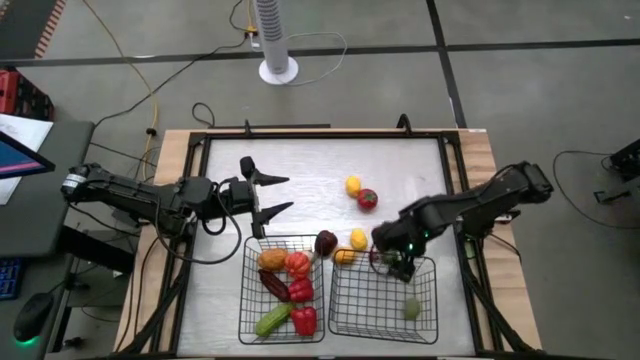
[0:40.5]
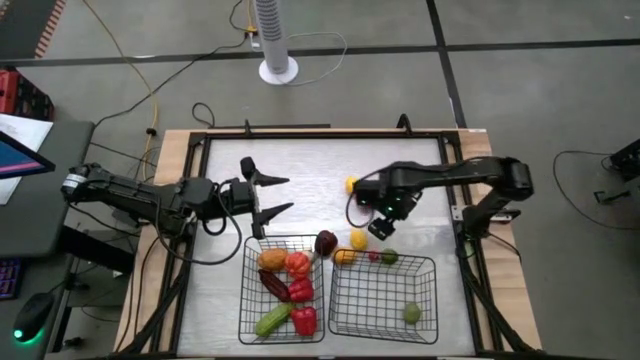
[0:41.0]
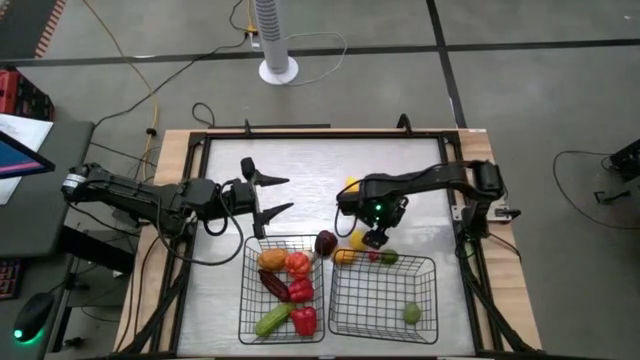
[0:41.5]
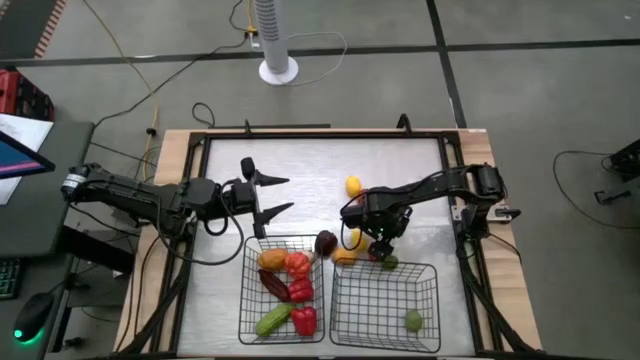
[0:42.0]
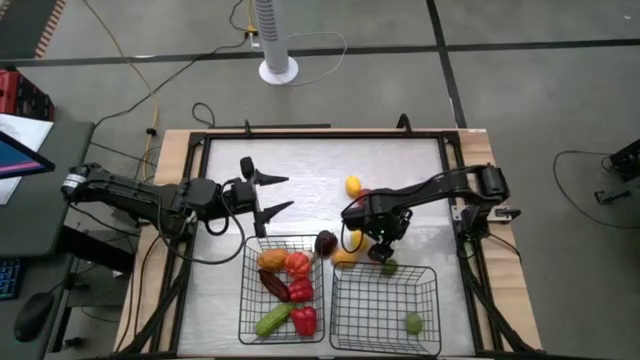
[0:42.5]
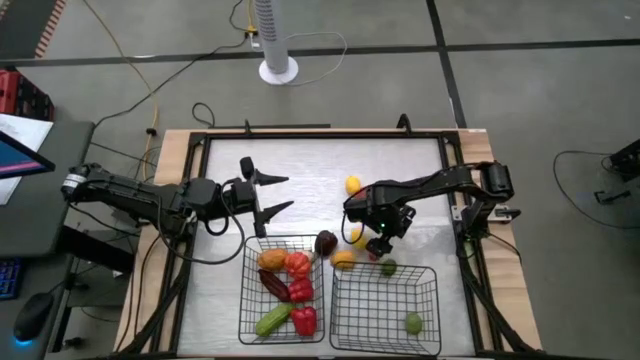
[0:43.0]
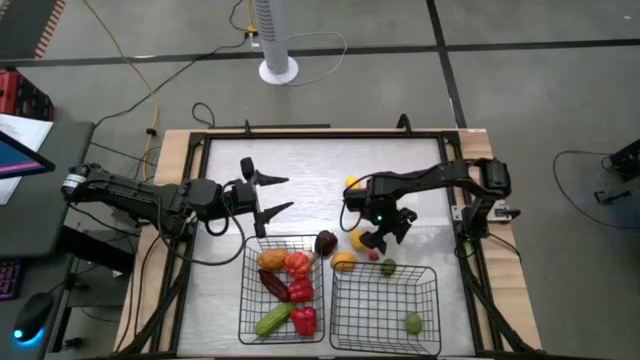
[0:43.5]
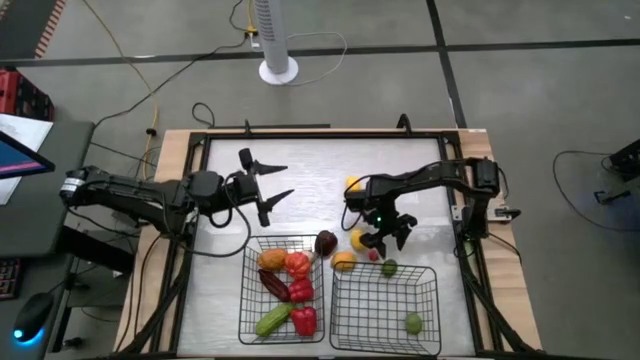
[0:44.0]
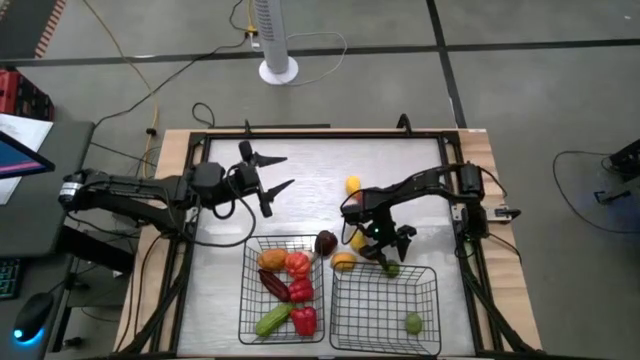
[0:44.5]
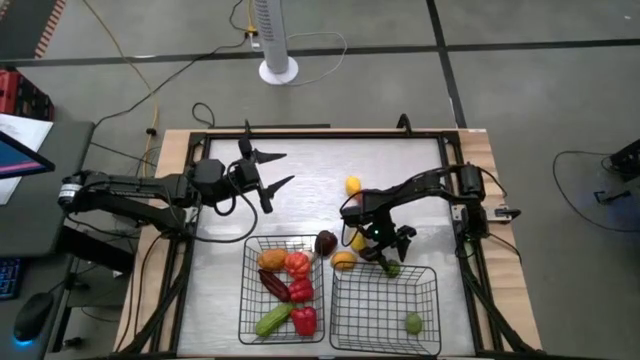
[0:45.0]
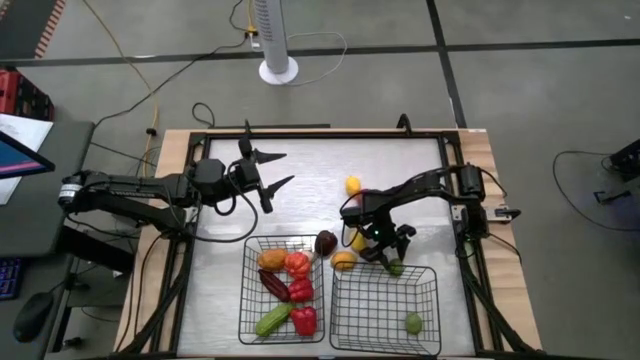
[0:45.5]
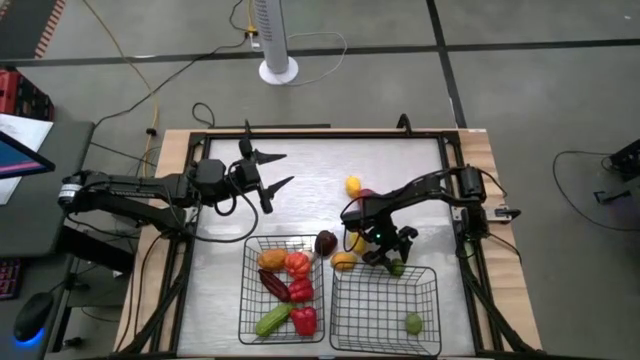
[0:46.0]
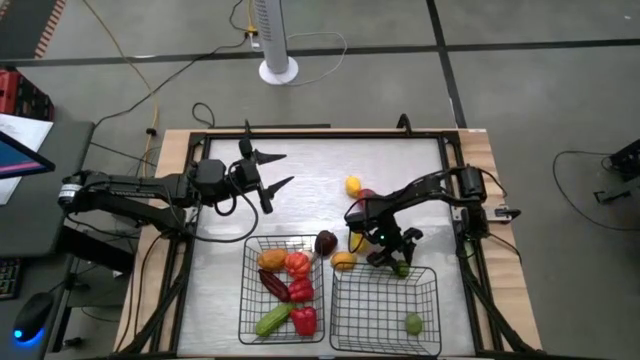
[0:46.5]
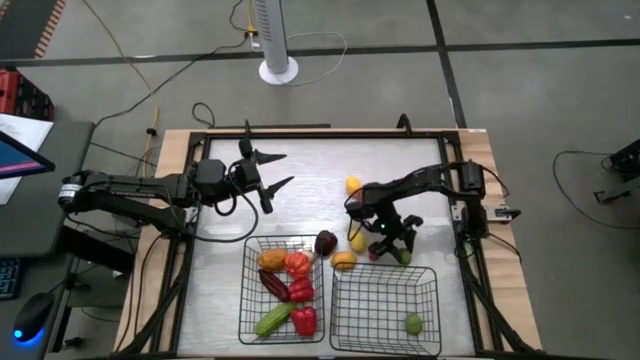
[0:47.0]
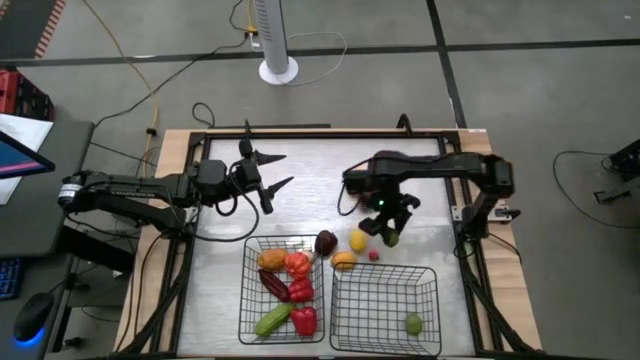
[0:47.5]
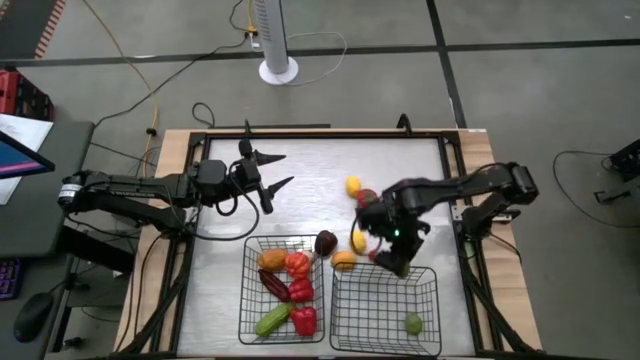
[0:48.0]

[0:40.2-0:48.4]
Task: Sort produce into baskets
Put the green lime into the right black wire basket

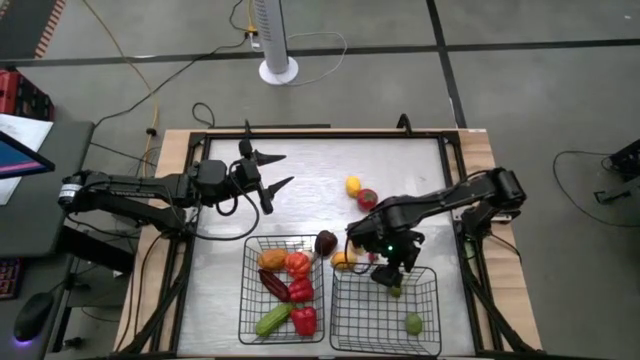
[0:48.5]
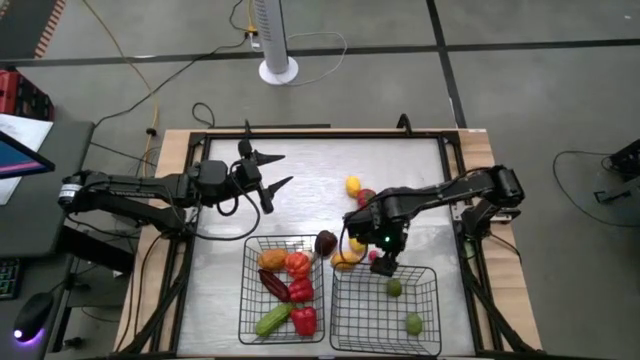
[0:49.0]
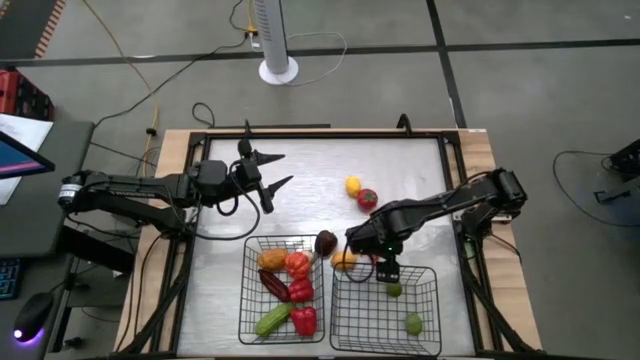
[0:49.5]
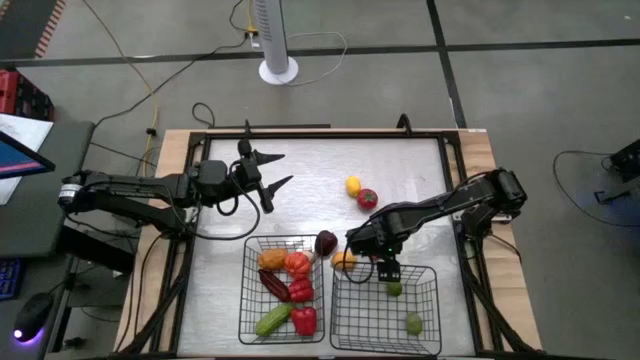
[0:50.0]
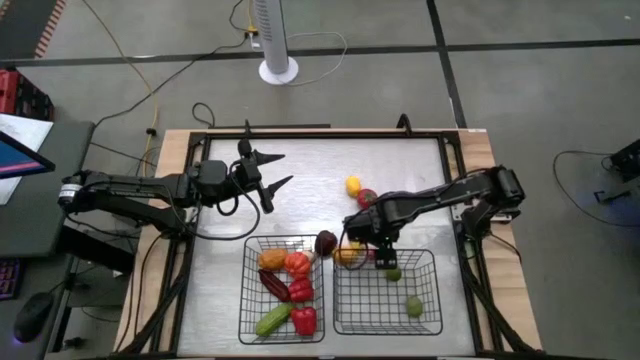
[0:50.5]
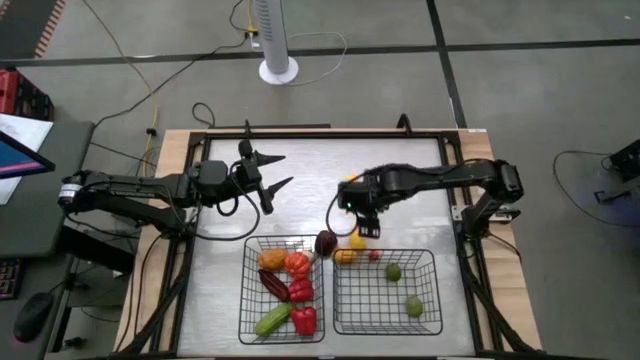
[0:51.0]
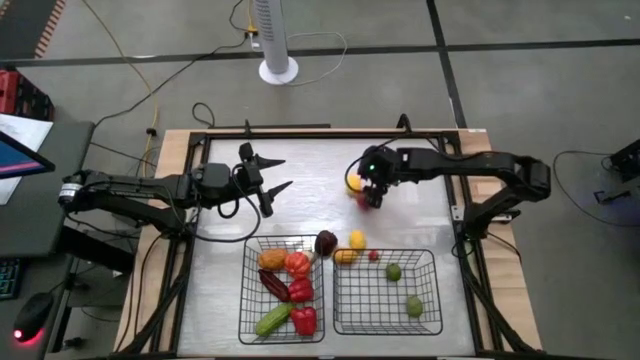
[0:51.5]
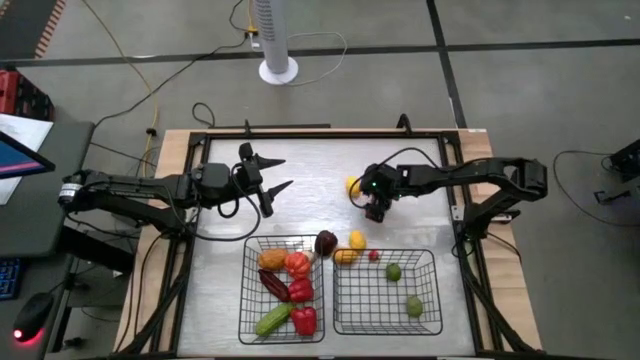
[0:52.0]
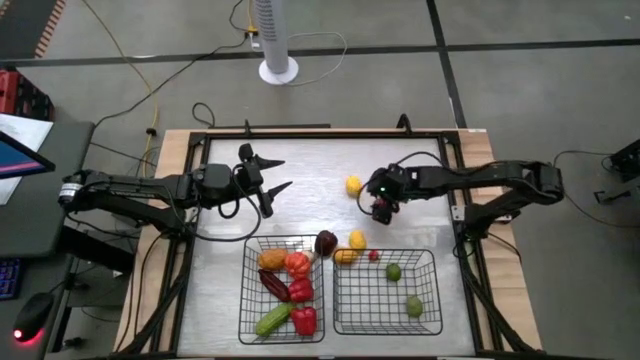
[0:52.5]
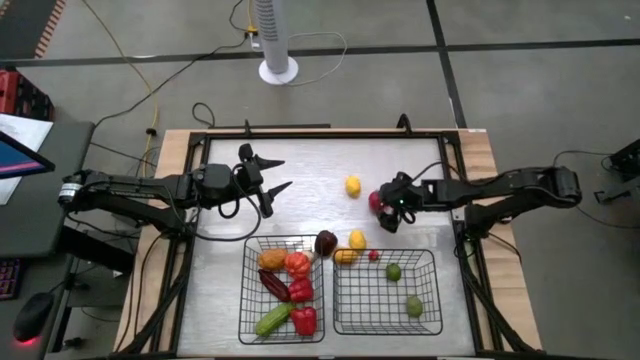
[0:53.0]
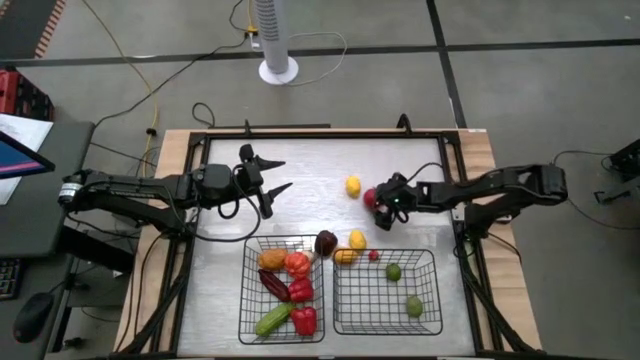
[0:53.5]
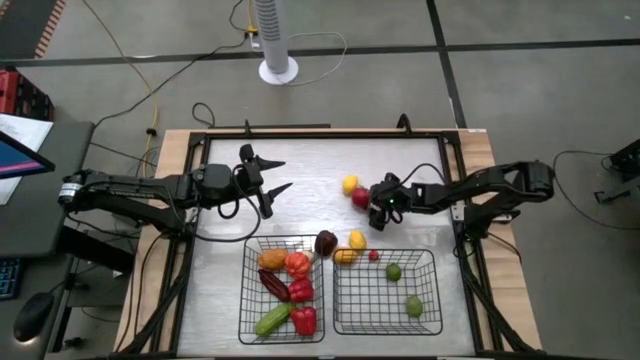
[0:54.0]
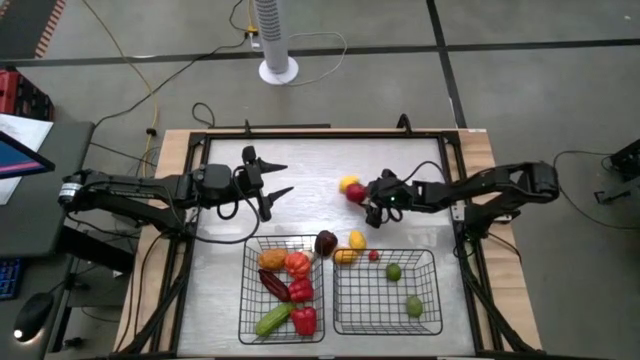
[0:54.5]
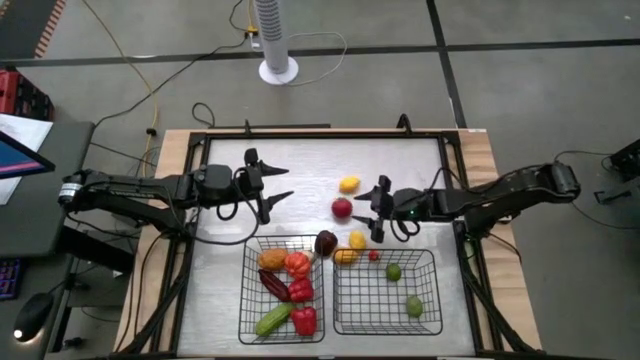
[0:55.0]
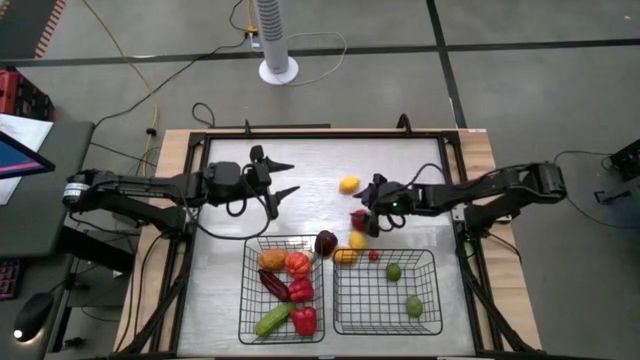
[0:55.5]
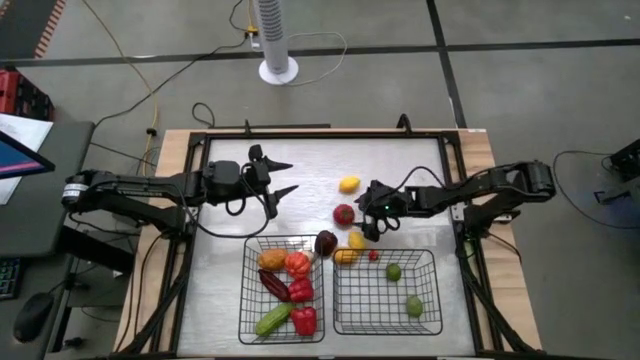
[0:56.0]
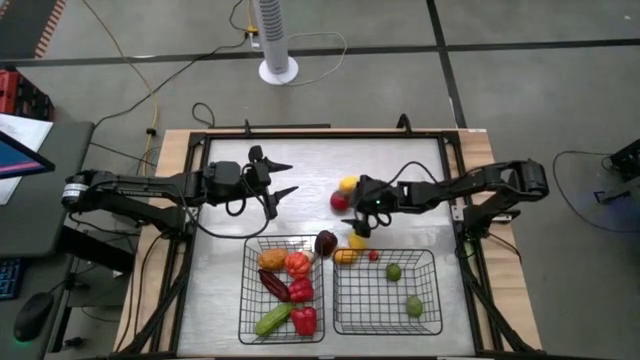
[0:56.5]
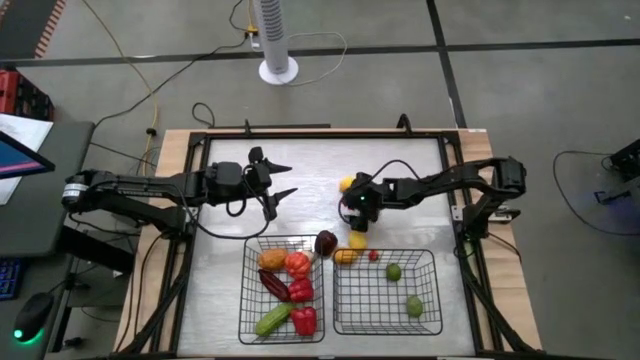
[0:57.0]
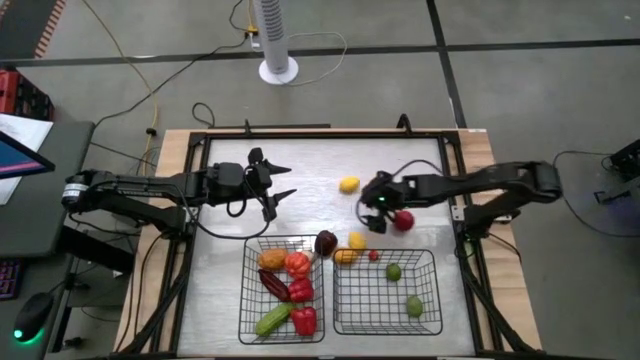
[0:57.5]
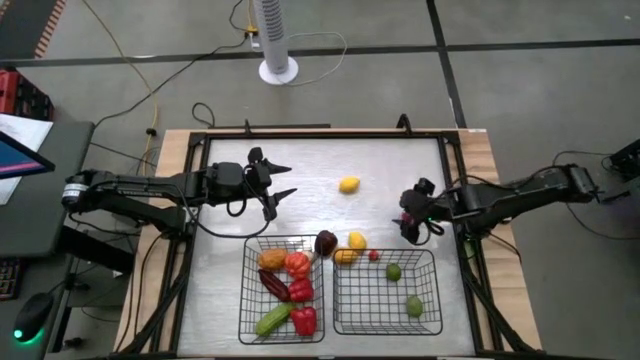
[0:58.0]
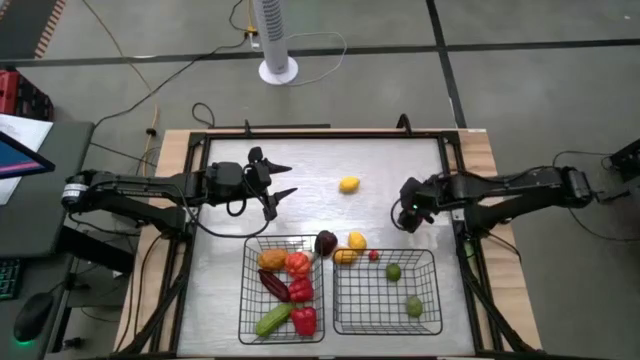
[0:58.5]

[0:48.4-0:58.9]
Put the red tomato into the right black wire basket

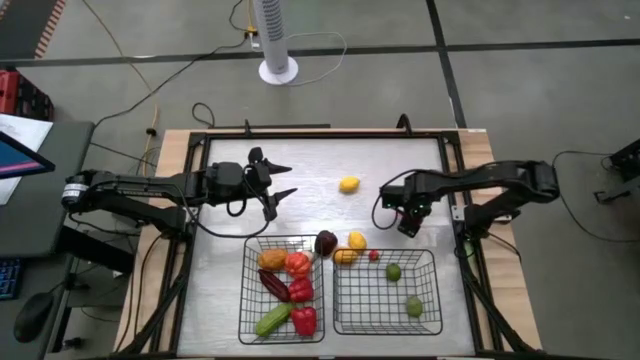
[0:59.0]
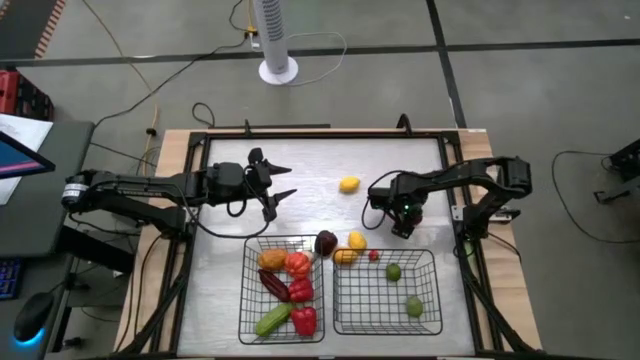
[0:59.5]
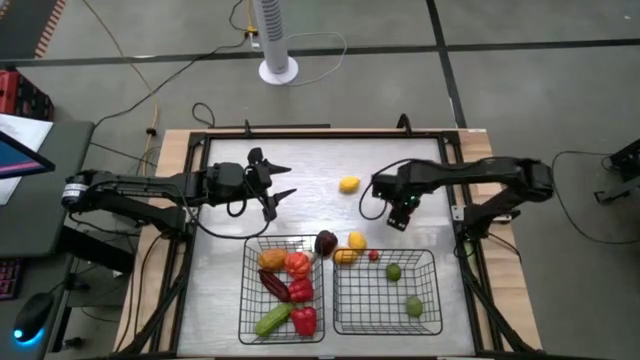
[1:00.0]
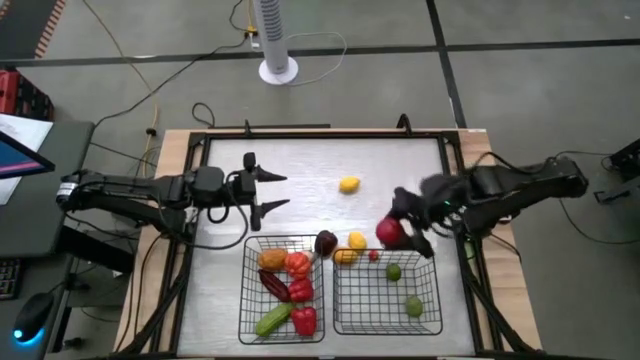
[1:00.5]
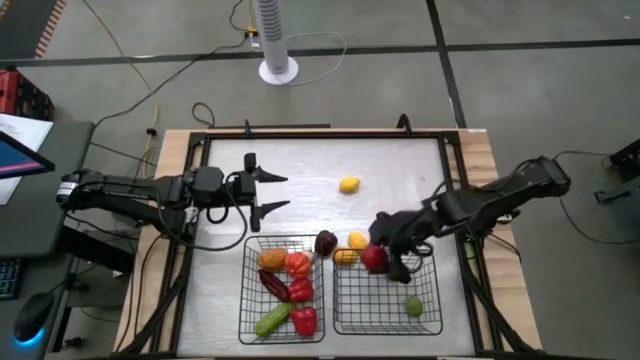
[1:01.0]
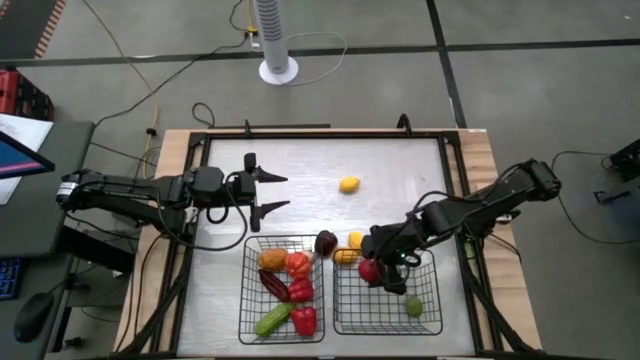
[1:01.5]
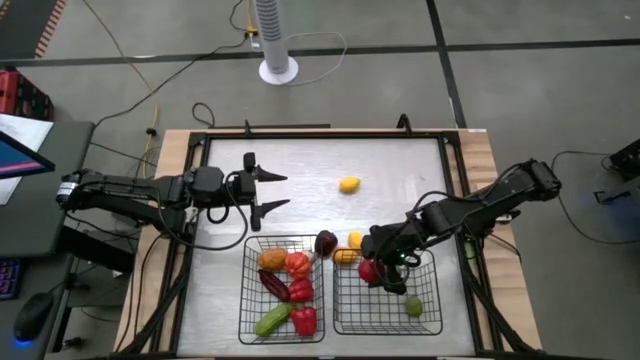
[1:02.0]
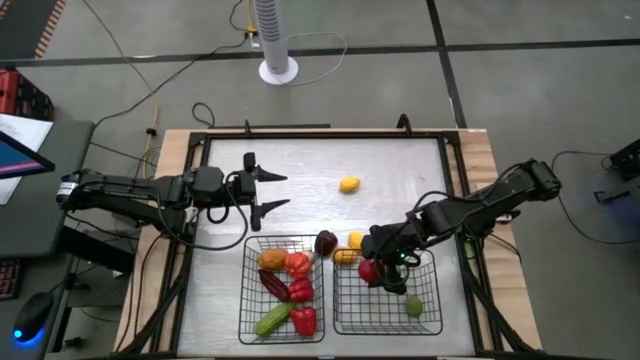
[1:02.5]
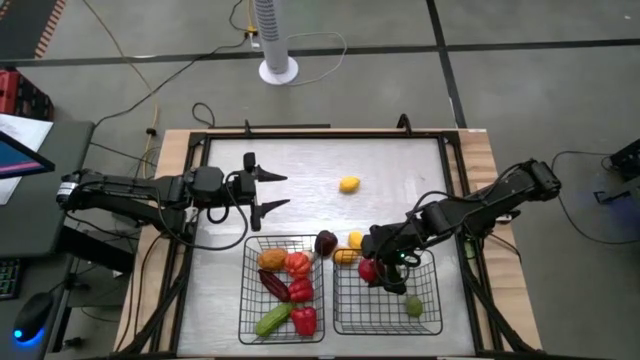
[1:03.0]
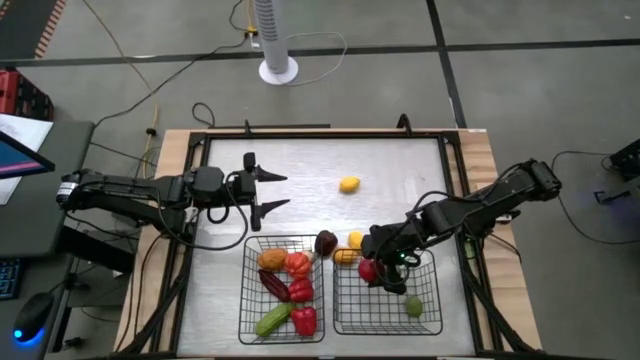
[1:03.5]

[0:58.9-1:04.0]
Put the red tomato into the right black wire basket
